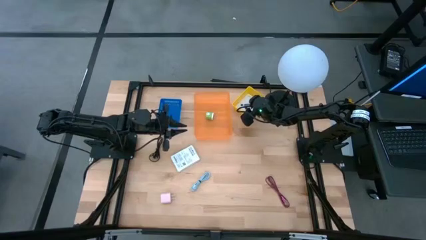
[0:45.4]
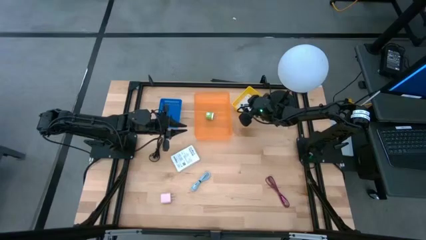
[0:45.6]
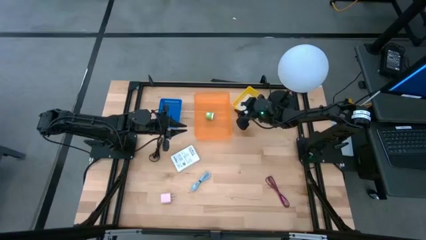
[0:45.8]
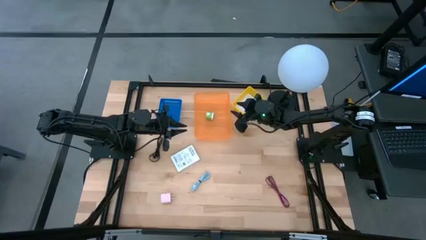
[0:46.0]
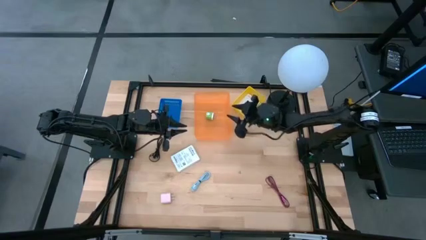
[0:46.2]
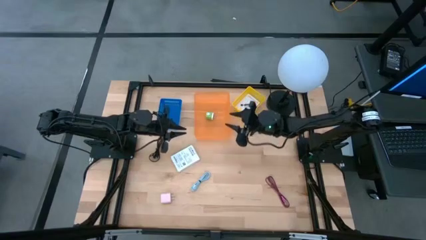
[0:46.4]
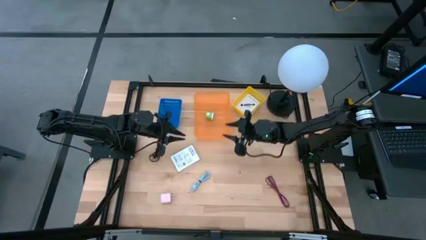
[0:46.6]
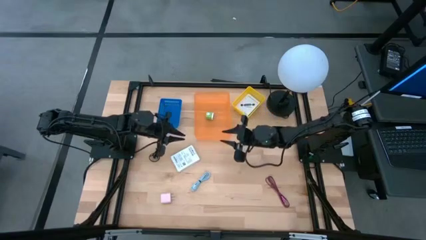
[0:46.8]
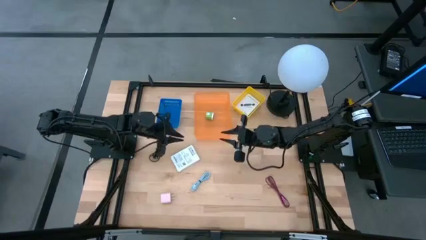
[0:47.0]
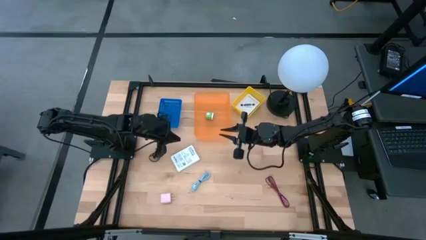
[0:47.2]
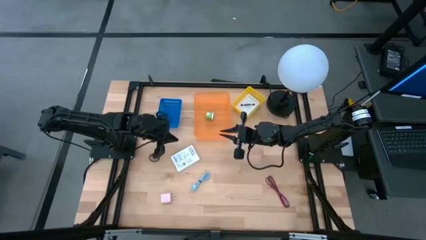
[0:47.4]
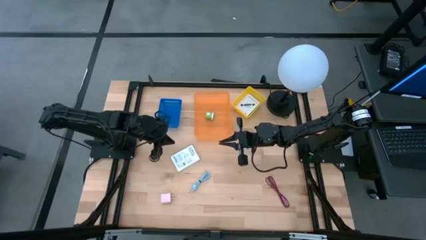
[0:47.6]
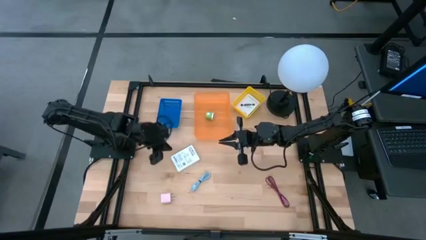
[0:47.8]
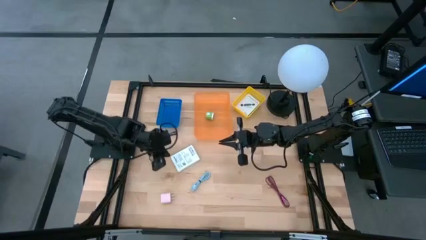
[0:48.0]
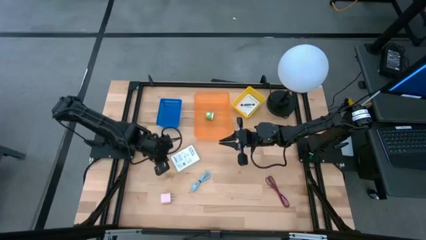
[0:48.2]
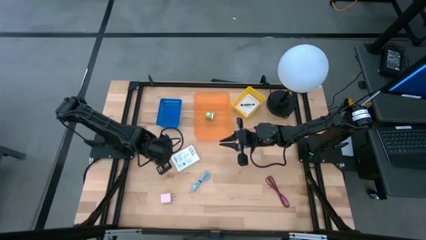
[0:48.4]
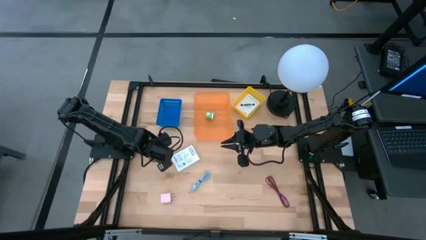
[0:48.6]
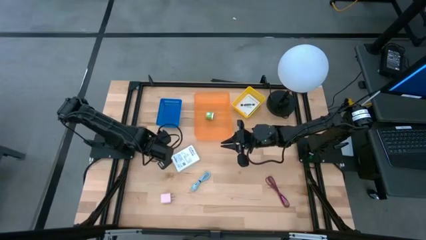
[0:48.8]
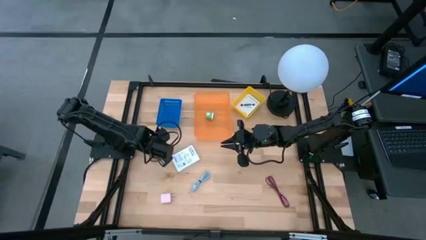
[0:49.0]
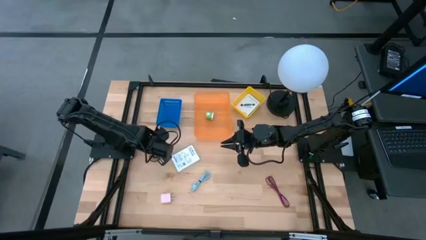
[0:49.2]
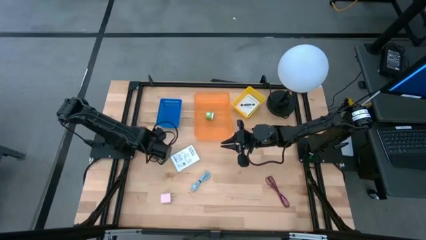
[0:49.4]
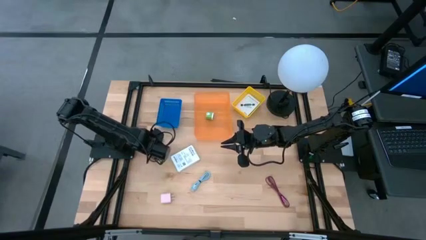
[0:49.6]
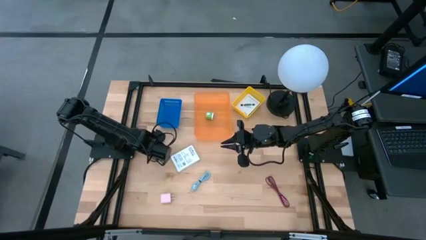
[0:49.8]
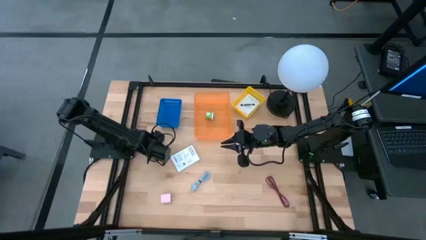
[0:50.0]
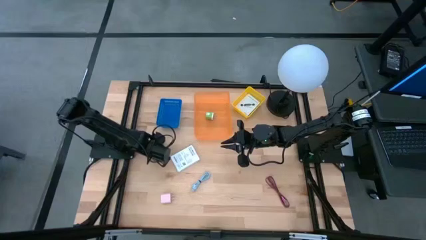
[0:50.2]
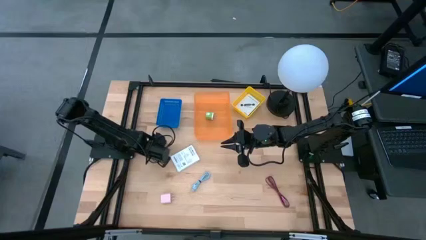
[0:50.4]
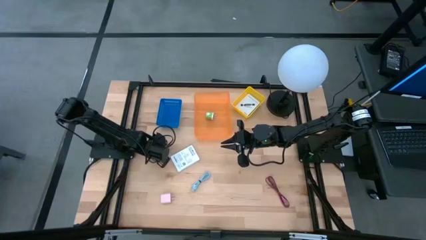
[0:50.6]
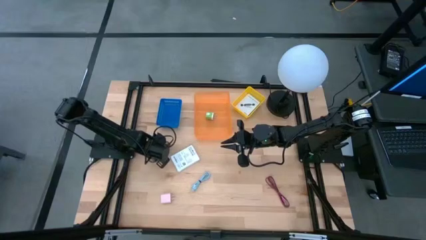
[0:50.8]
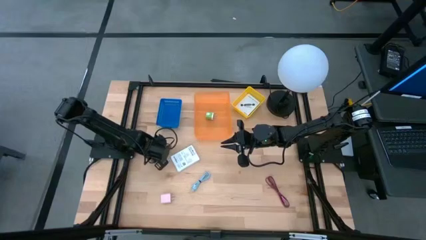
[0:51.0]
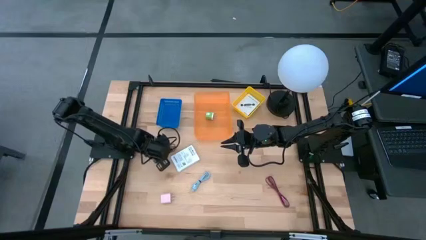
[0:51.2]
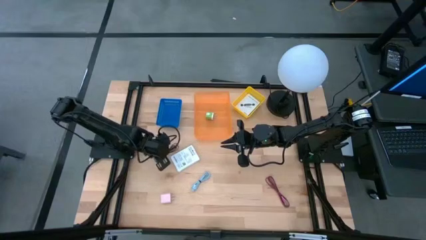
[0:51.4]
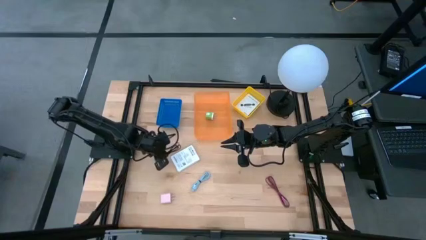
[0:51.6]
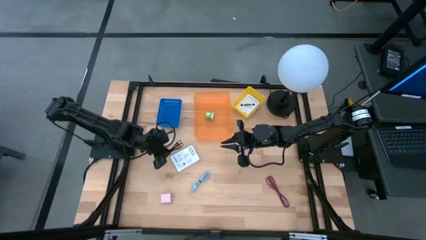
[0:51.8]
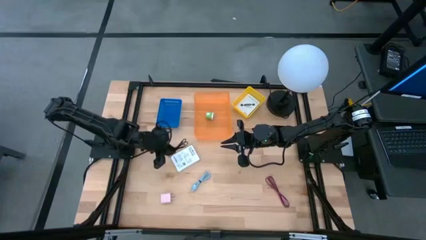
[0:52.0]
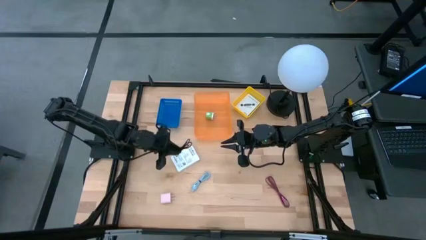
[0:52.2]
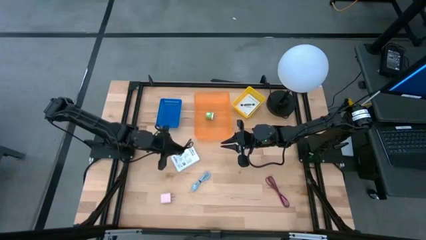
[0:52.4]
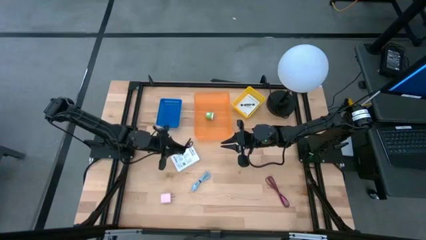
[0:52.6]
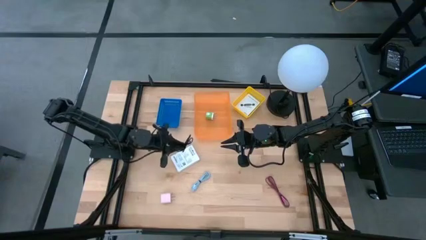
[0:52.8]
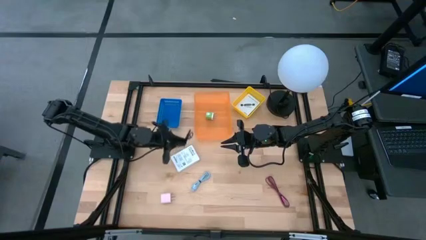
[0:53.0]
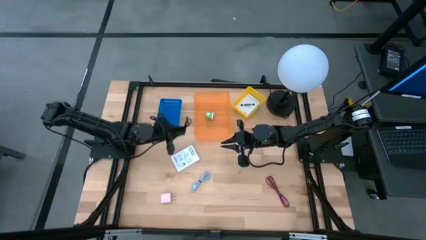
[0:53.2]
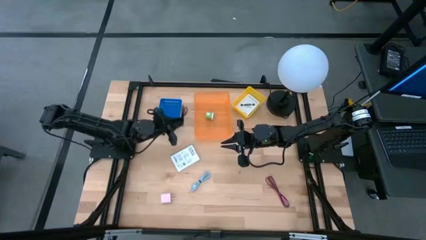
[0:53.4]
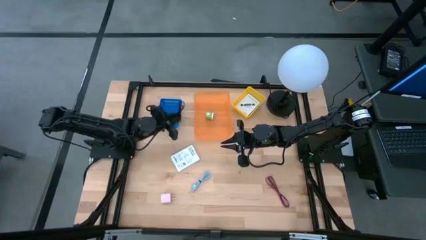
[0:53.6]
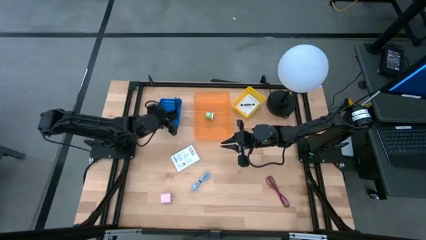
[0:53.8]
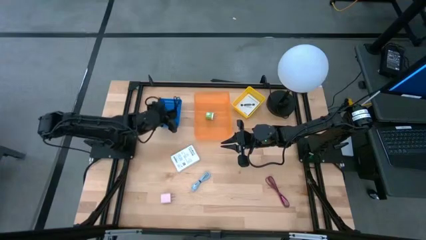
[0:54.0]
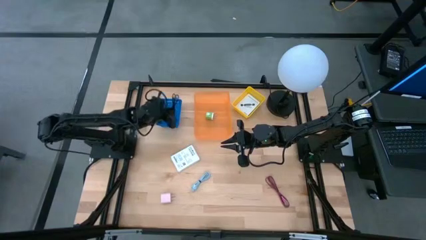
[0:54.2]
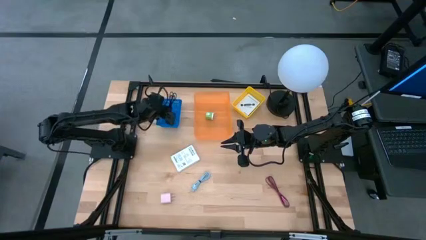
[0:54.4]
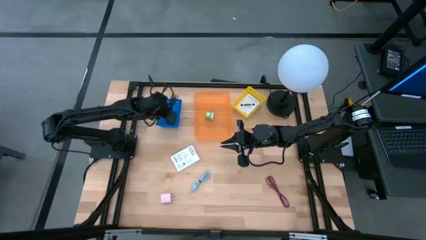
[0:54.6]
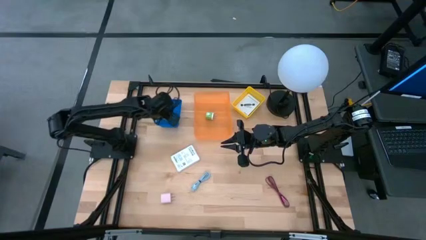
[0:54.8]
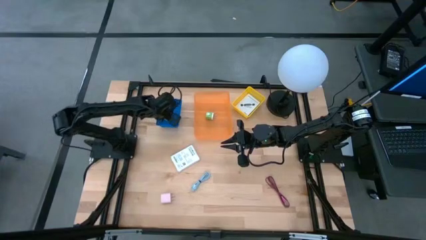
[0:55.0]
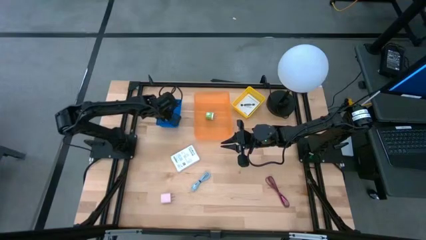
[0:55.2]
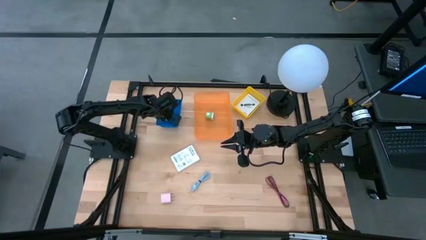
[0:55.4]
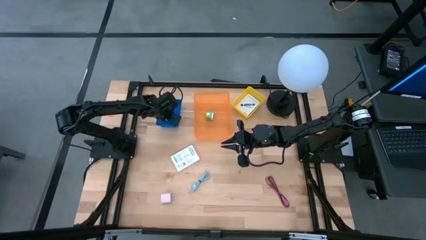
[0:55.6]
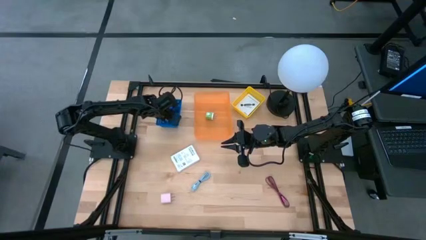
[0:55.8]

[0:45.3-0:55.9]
Task: Pick and place items into bin
Put the black USB cable wire into the blue basket
